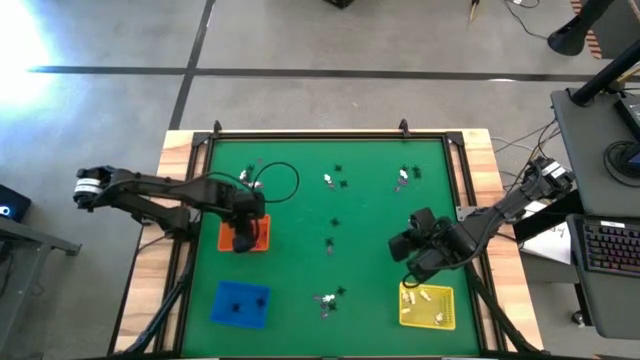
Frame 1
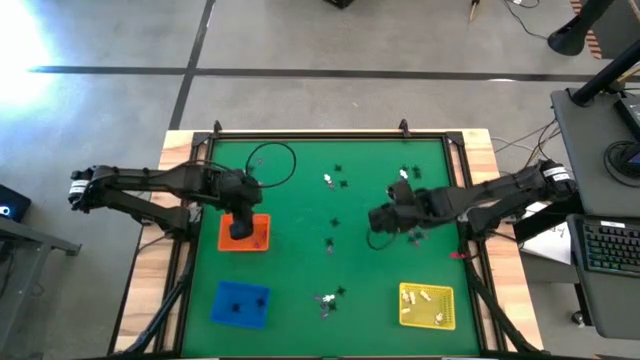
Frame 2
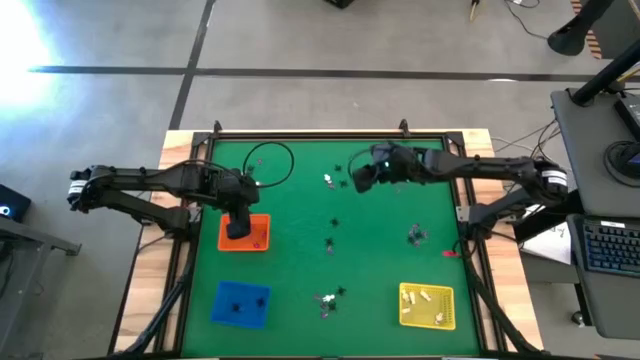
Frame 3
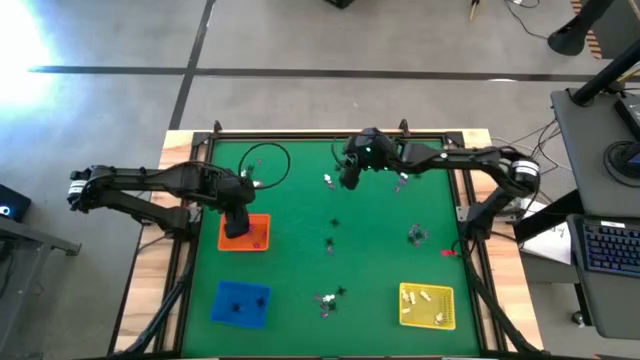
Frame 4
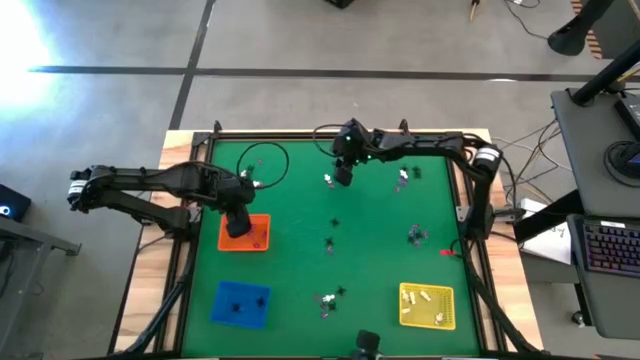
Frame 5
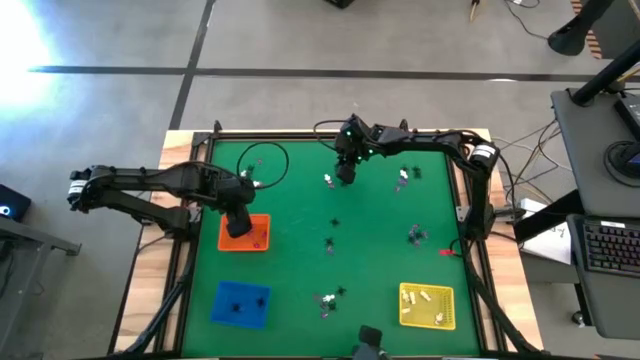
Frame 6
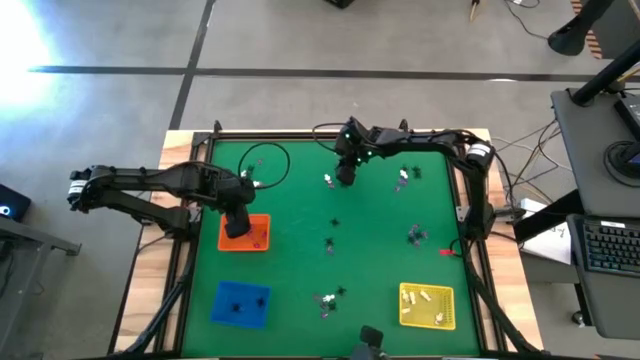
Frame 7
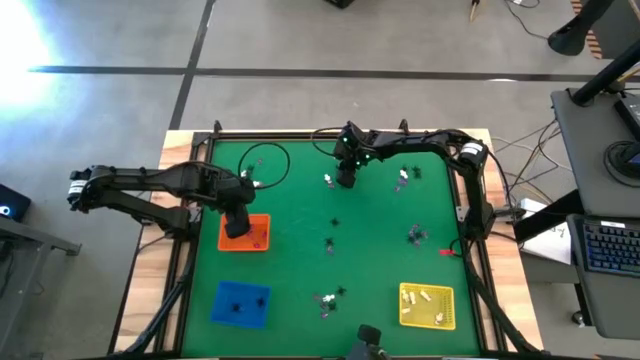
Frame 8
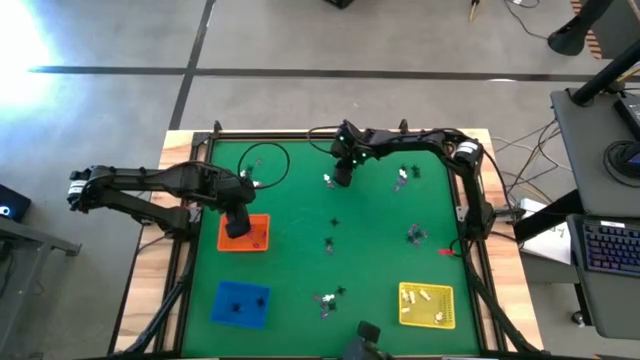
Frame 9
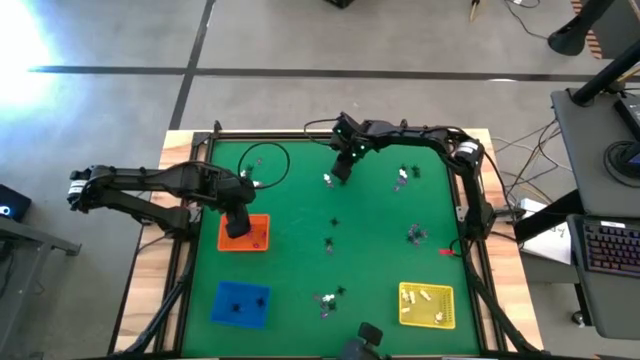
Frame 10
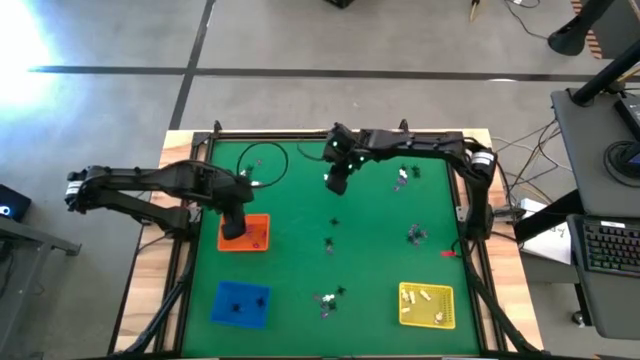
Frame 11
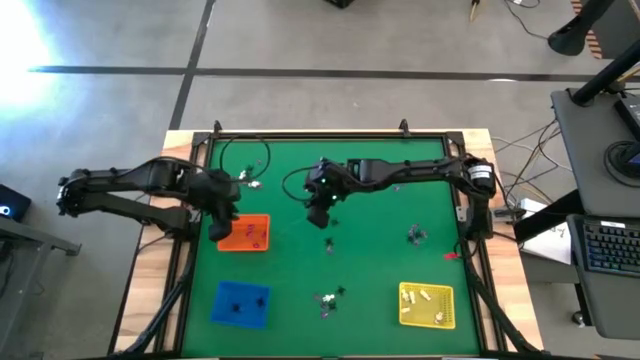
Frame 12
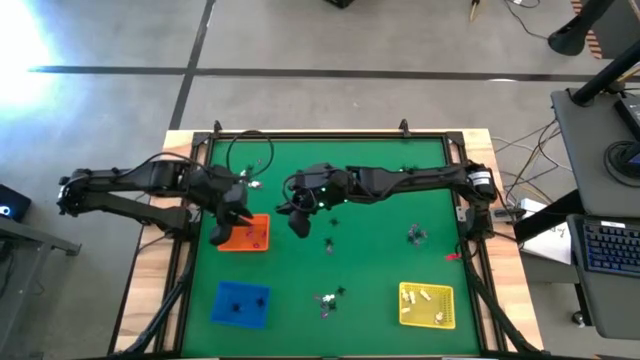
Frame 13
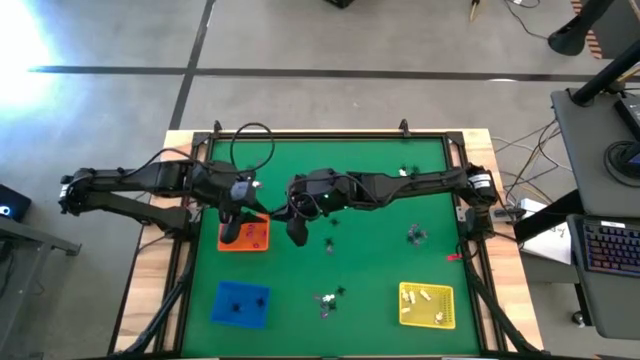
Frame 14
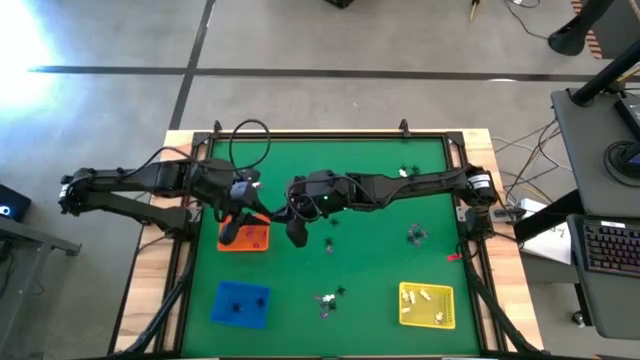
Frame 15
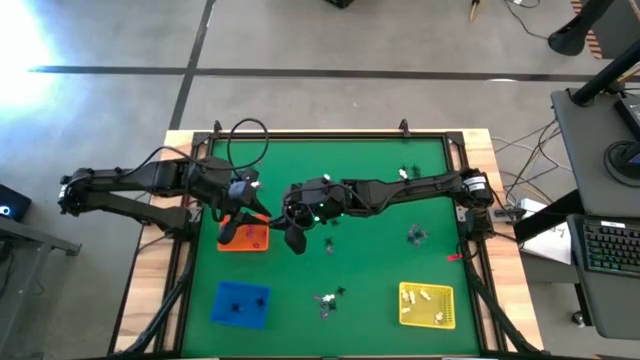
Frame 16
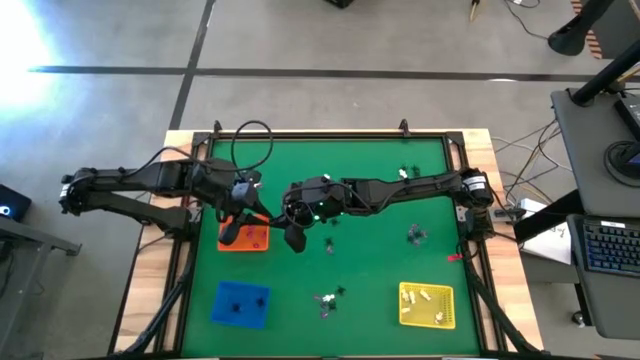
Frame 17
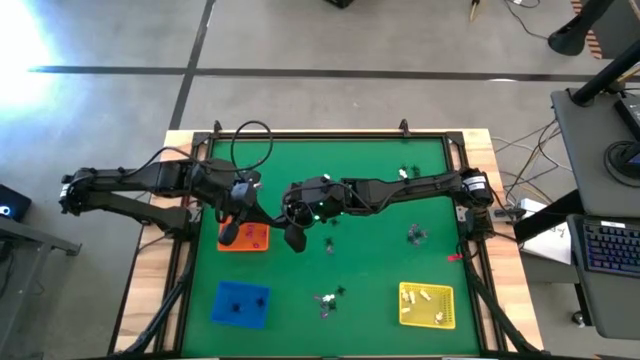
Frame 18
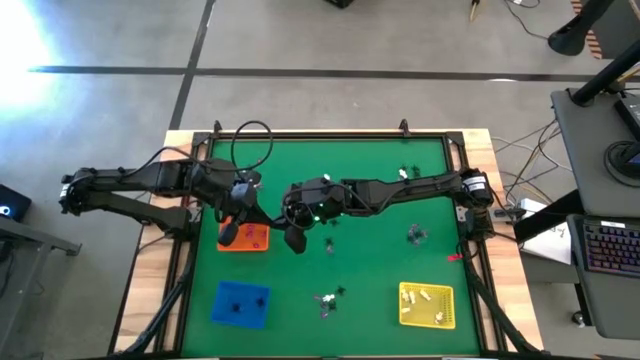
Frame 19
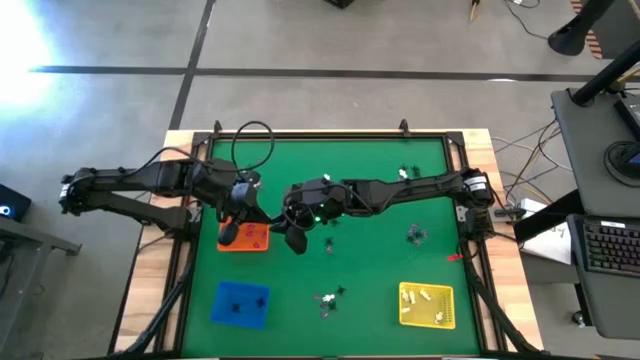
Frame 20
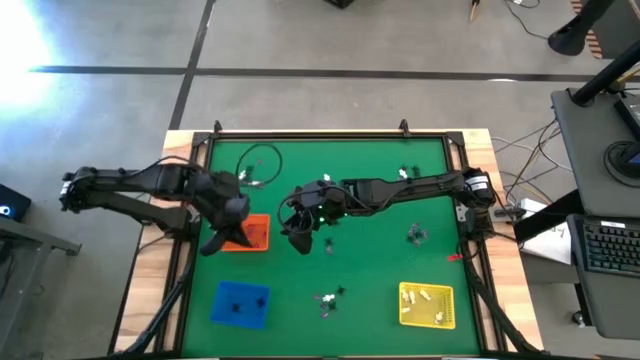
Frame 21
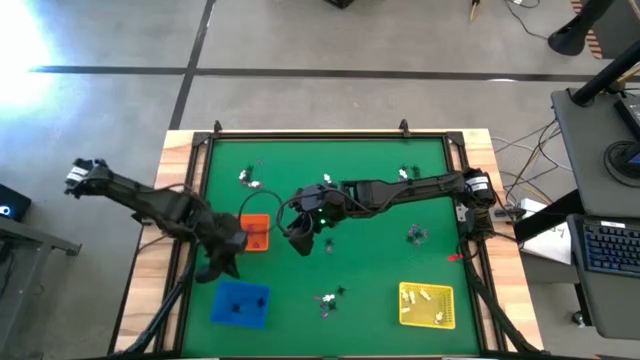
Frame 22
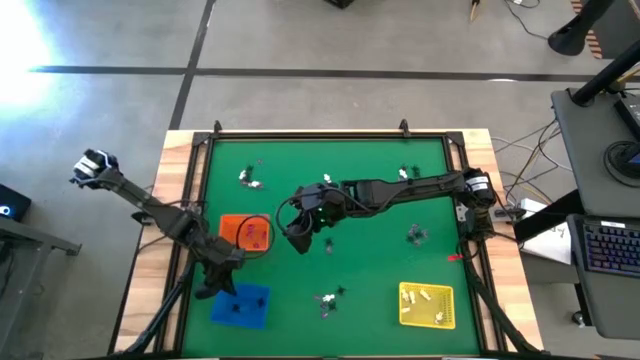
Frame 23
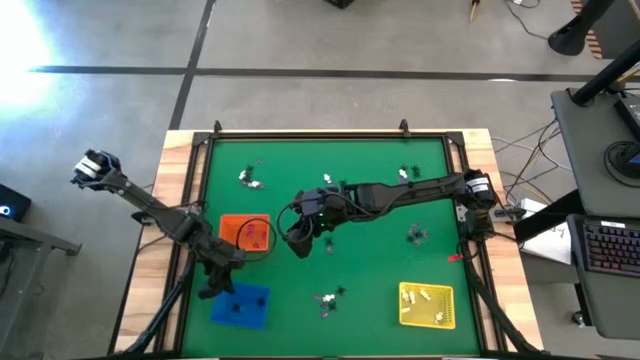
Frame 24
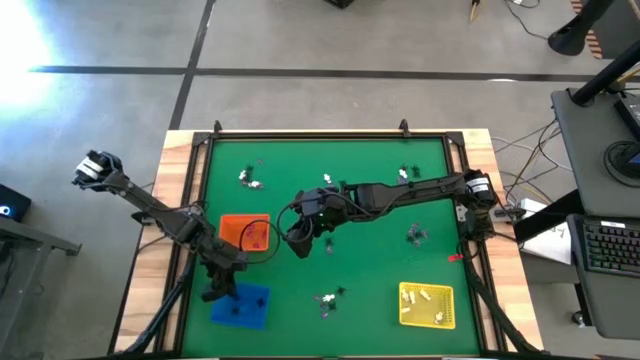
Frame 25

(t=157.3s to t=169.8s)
Task: Sort Halloween decoration
Put the black spider toy into the blue bin

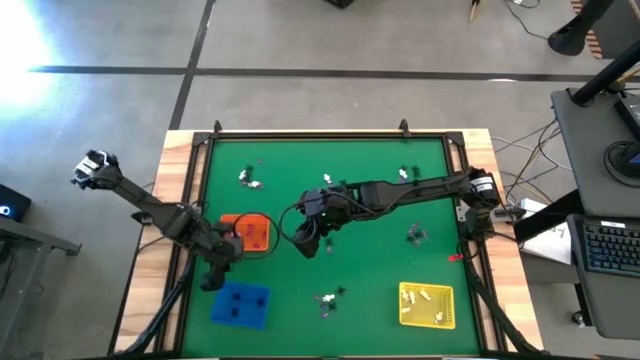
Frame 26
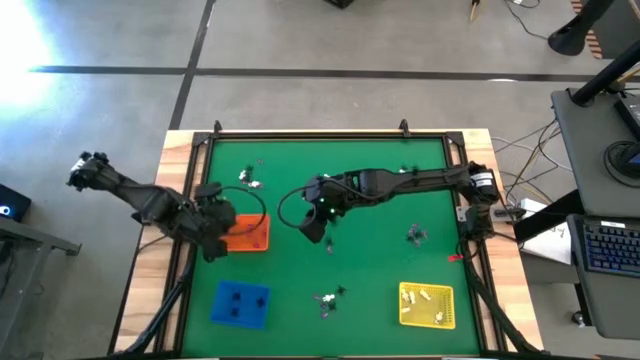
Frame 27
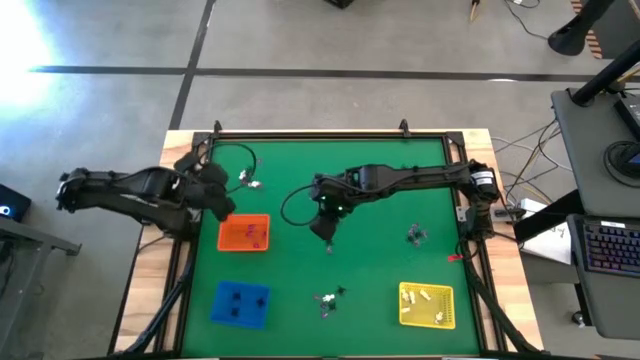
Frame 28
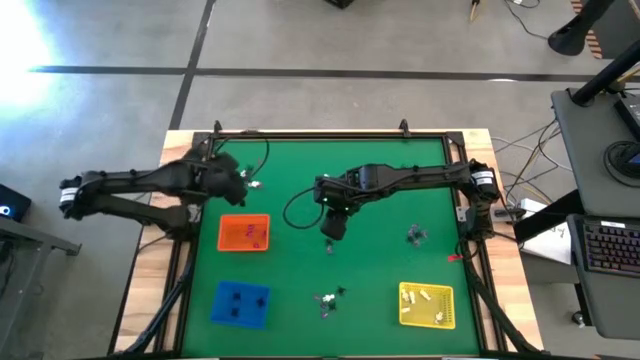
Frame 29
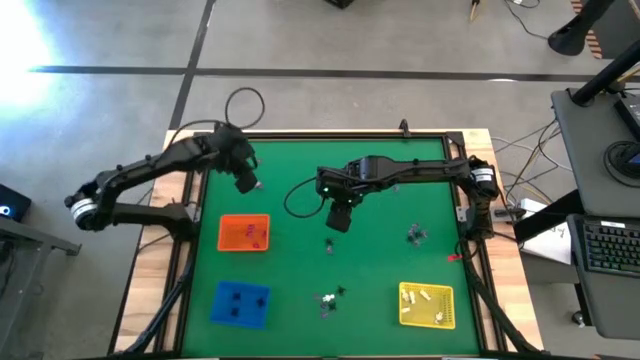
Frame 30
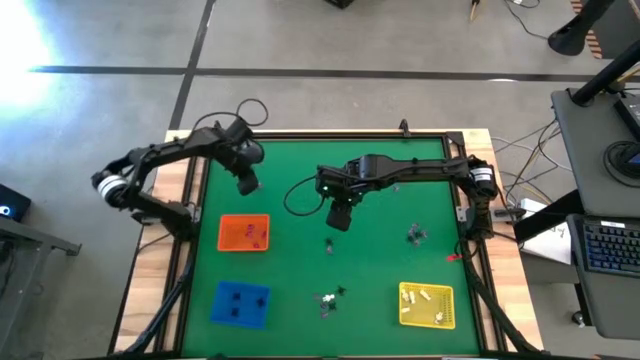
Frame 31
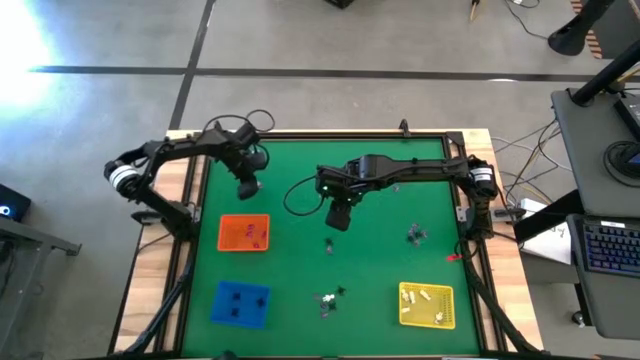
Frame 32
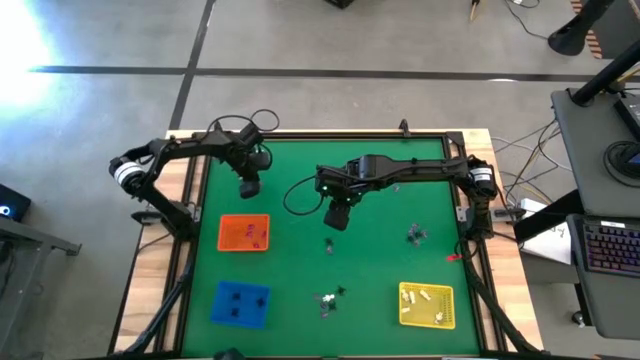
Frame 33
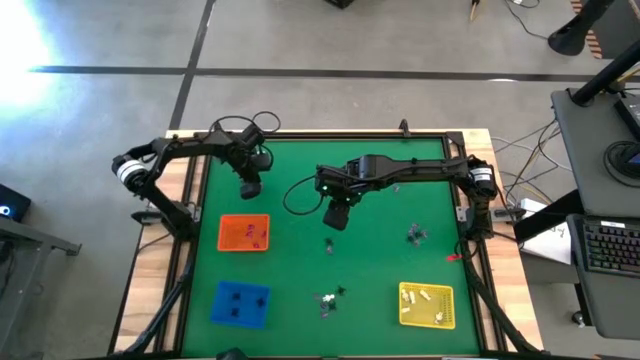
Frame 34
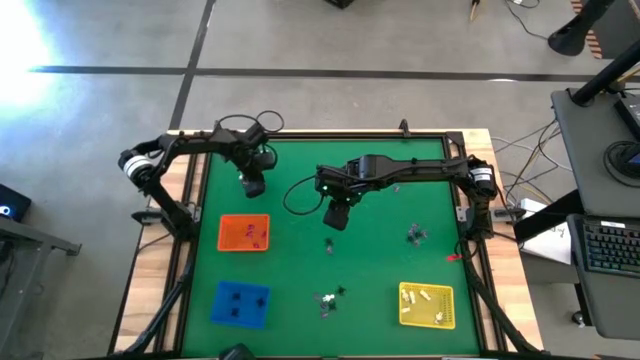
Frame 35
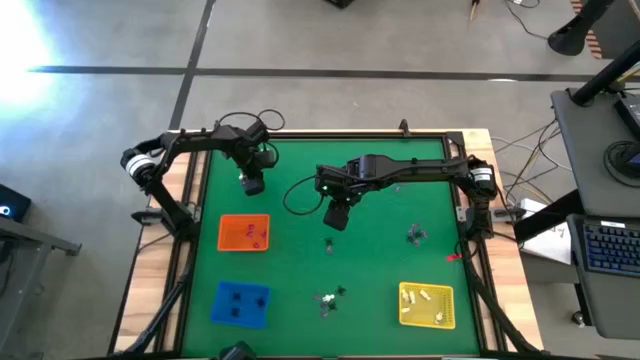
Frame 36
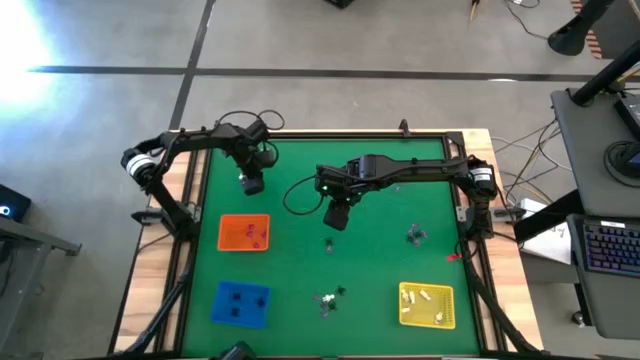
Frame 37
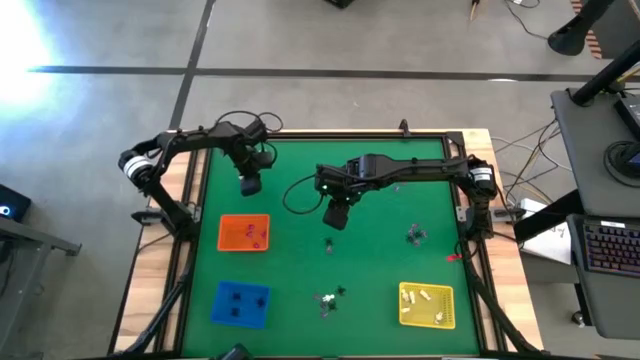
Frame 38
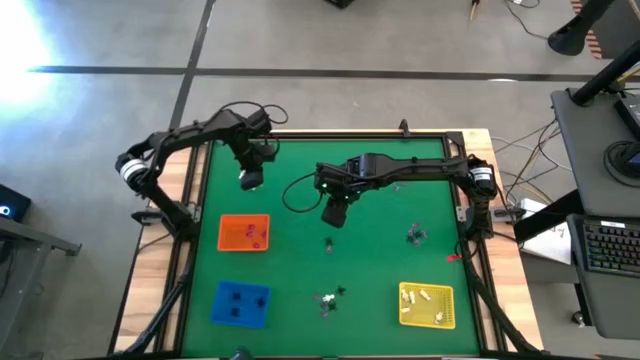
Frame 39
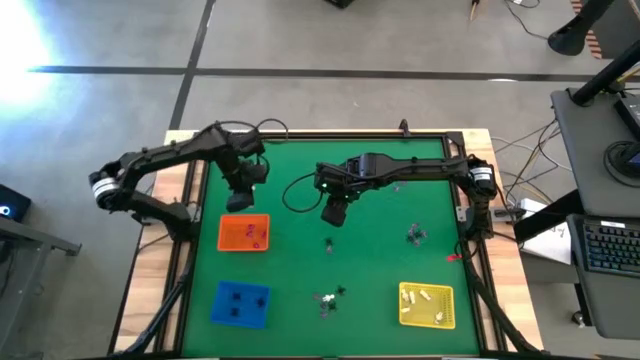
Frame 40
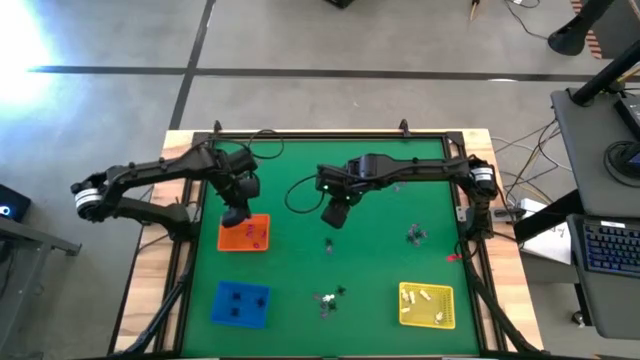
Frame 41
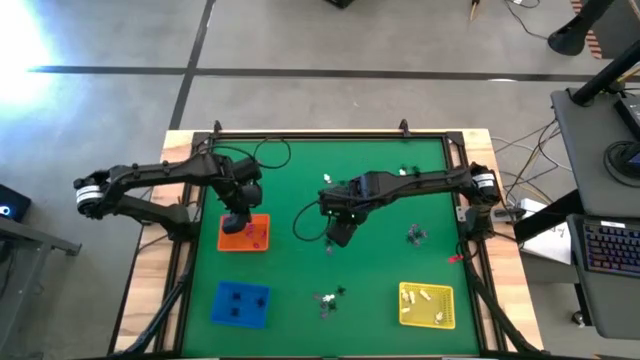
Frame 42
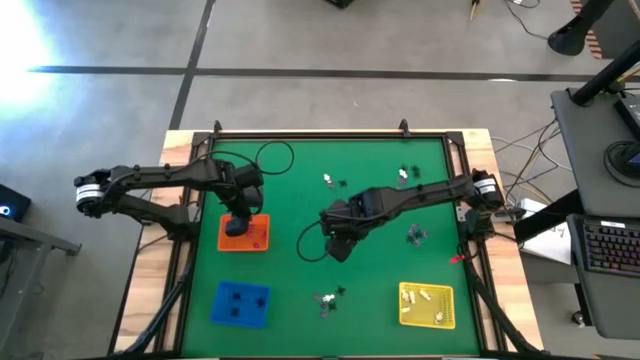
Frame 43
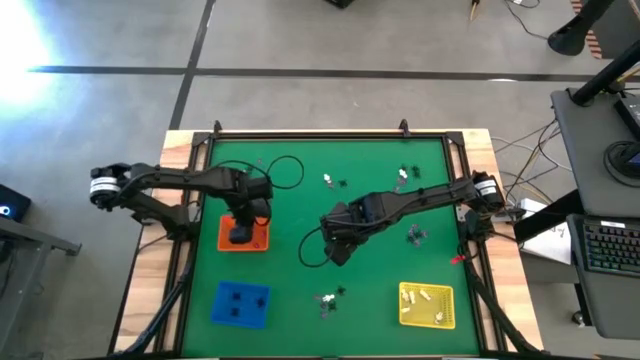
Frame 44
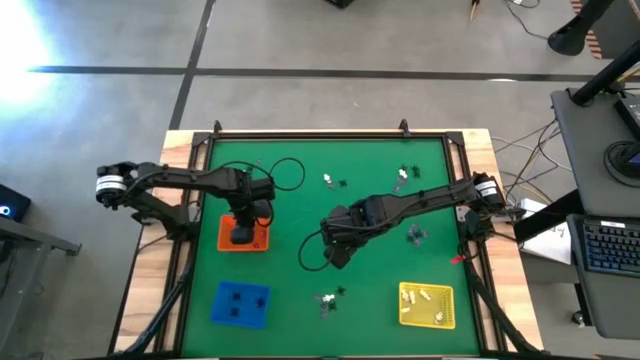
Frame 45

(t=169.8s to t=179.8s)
Put the violet witch hat toy into the orange bin
